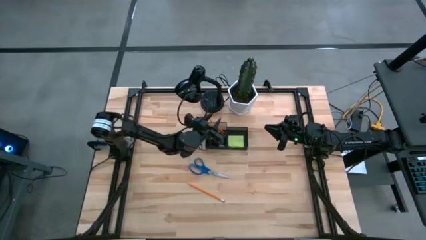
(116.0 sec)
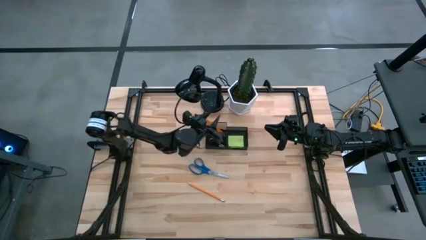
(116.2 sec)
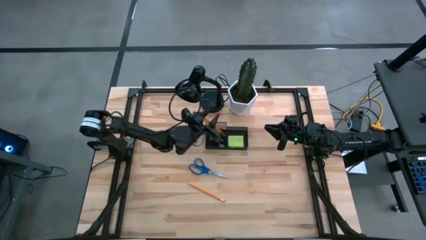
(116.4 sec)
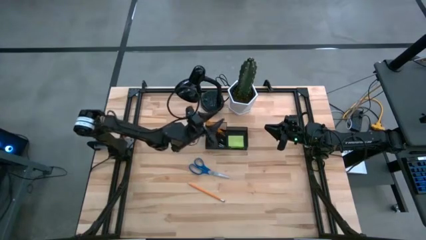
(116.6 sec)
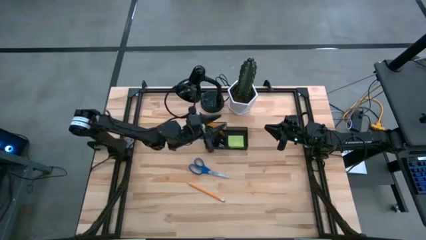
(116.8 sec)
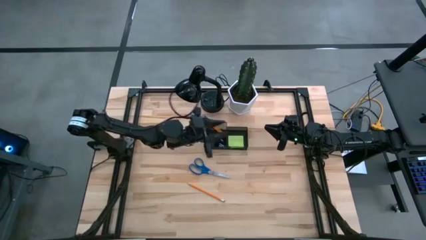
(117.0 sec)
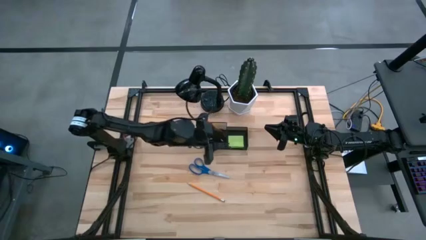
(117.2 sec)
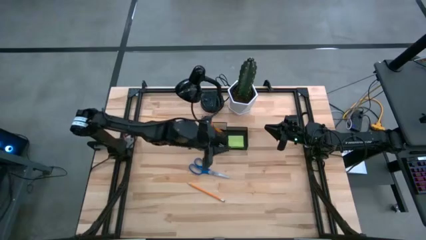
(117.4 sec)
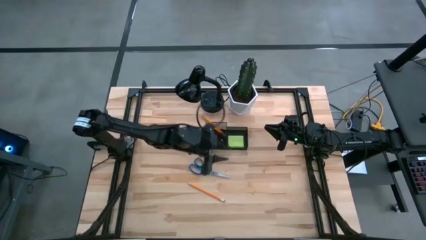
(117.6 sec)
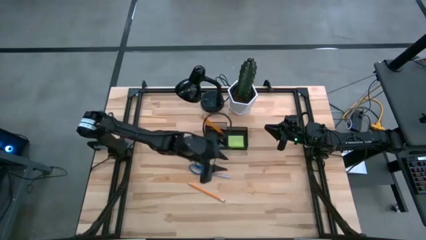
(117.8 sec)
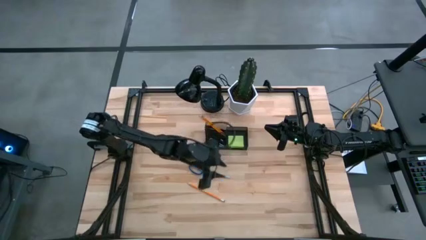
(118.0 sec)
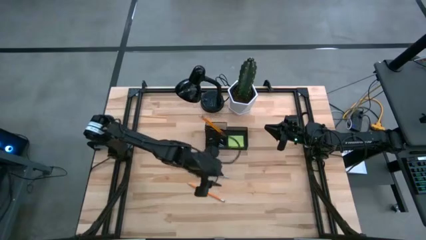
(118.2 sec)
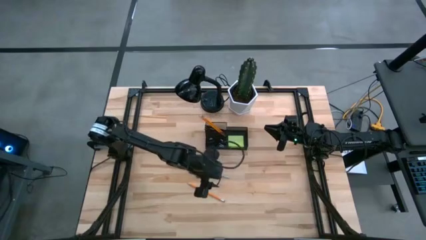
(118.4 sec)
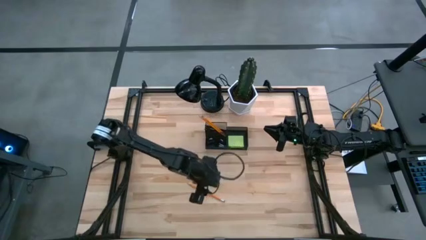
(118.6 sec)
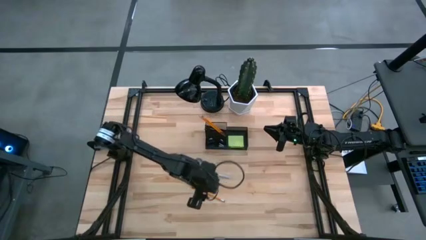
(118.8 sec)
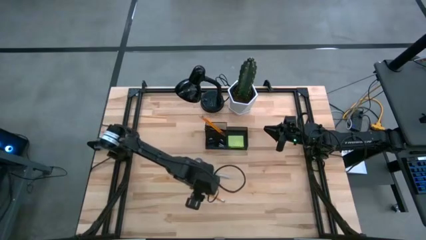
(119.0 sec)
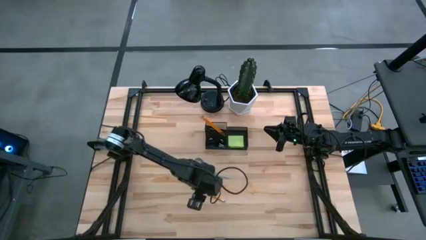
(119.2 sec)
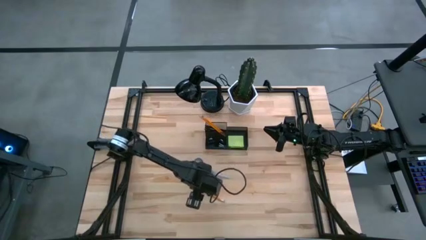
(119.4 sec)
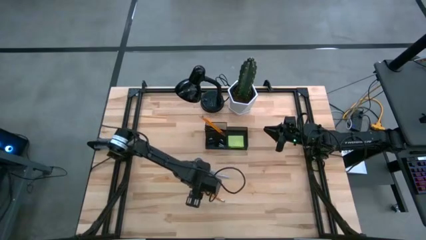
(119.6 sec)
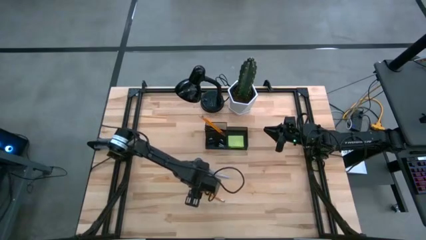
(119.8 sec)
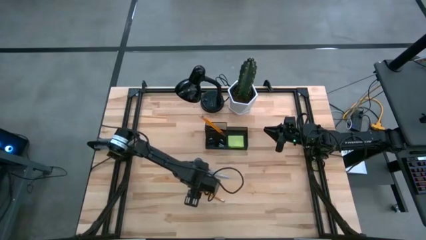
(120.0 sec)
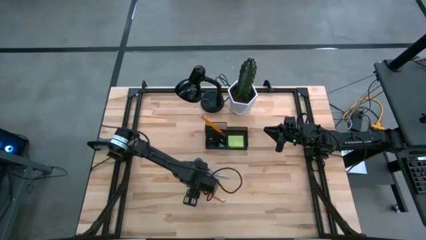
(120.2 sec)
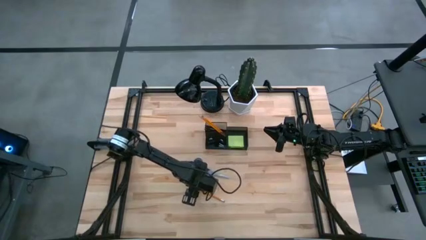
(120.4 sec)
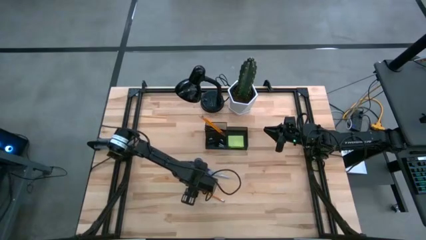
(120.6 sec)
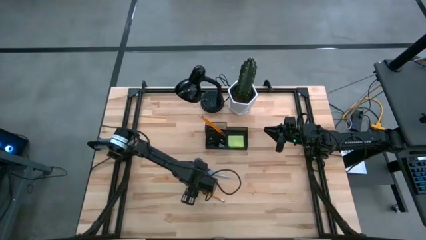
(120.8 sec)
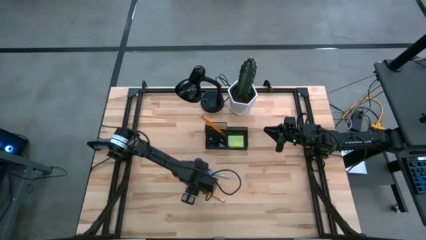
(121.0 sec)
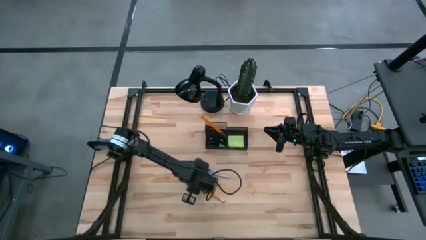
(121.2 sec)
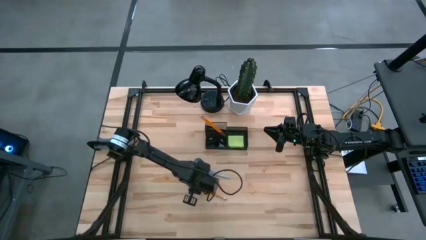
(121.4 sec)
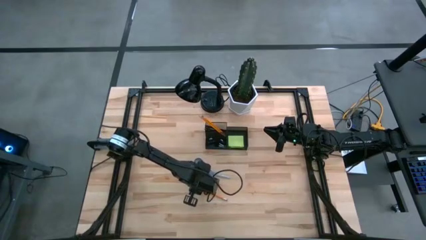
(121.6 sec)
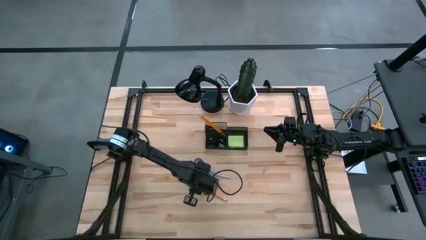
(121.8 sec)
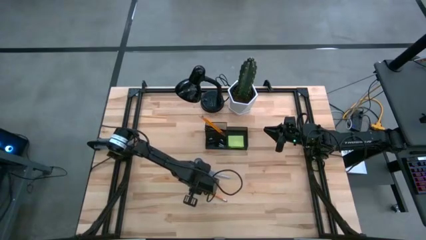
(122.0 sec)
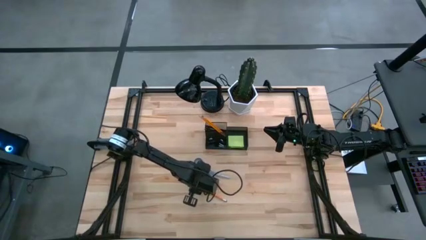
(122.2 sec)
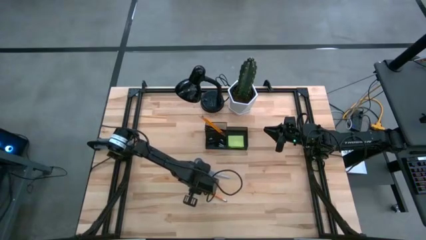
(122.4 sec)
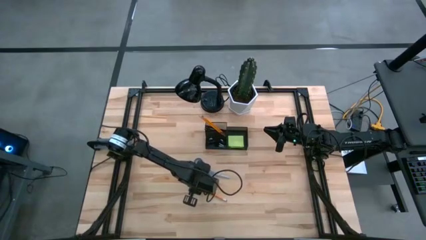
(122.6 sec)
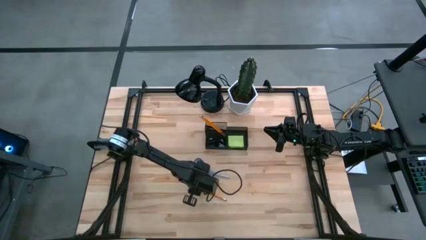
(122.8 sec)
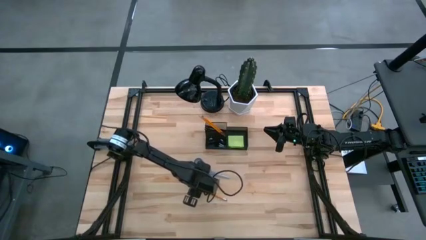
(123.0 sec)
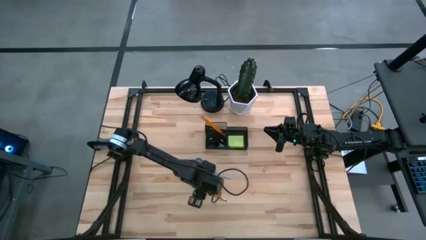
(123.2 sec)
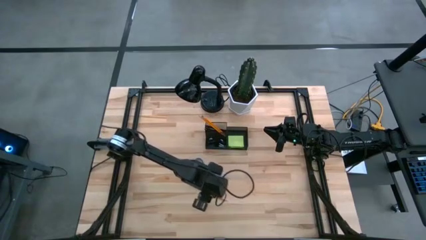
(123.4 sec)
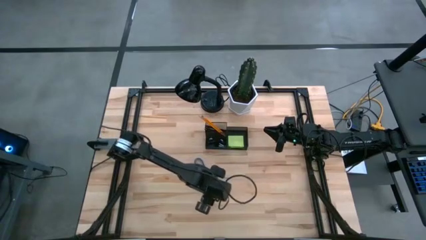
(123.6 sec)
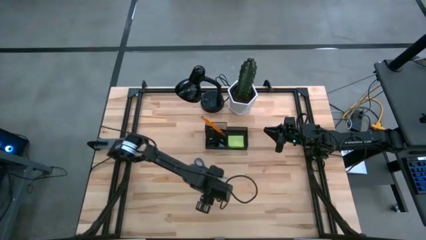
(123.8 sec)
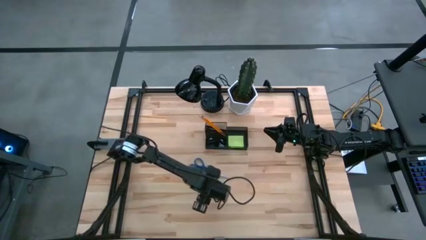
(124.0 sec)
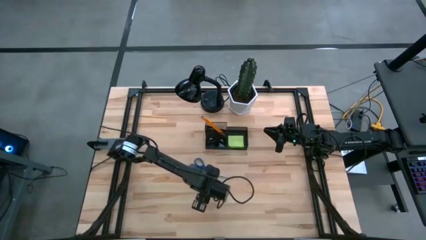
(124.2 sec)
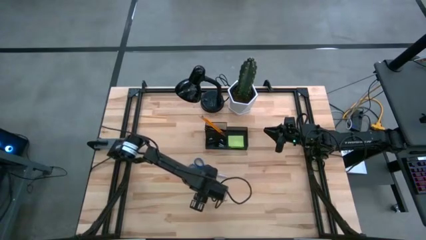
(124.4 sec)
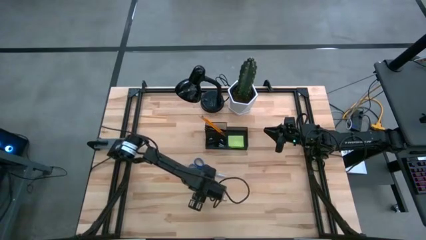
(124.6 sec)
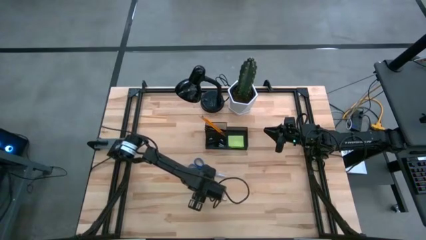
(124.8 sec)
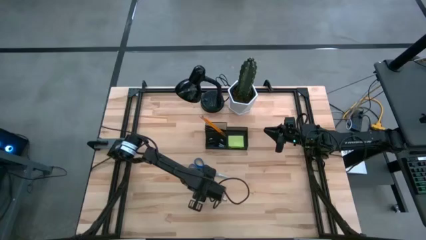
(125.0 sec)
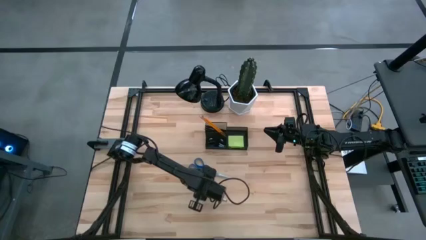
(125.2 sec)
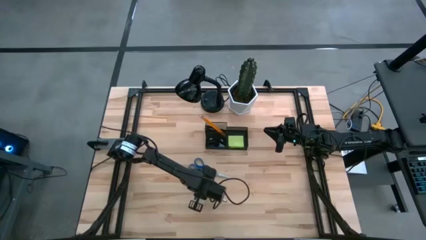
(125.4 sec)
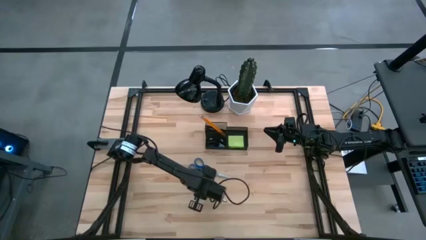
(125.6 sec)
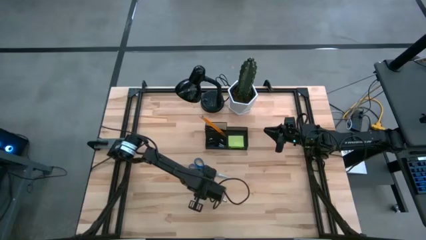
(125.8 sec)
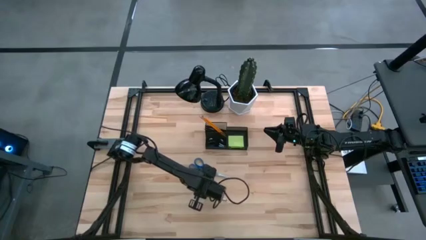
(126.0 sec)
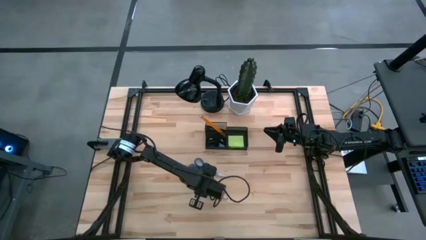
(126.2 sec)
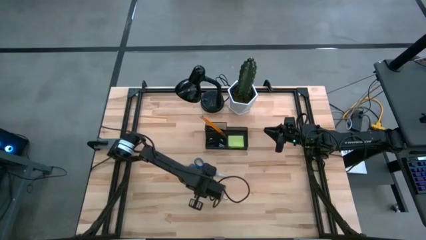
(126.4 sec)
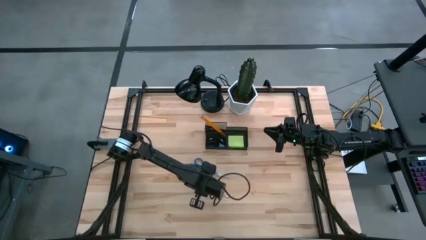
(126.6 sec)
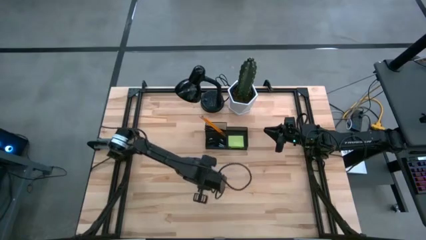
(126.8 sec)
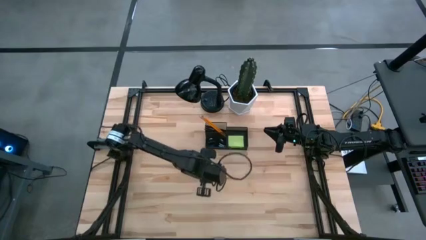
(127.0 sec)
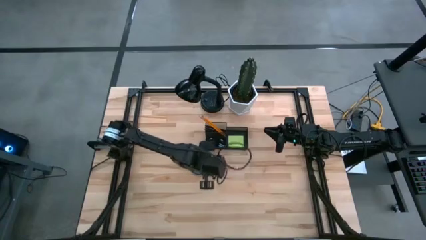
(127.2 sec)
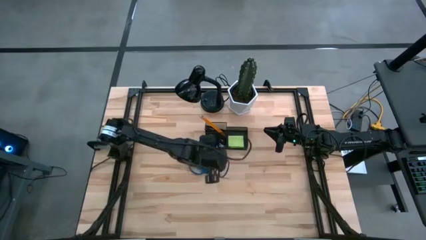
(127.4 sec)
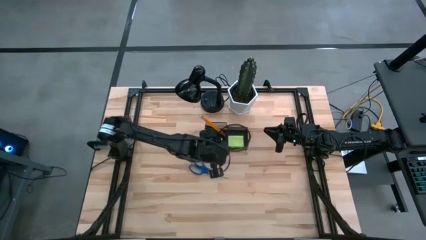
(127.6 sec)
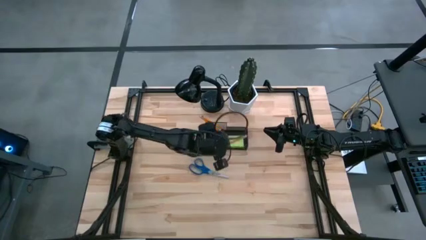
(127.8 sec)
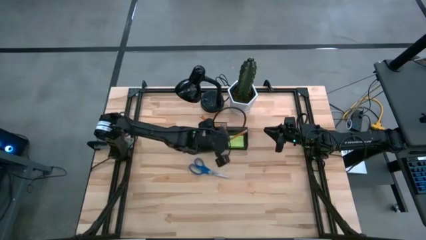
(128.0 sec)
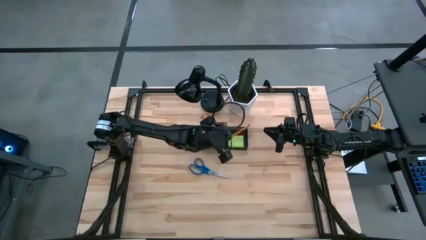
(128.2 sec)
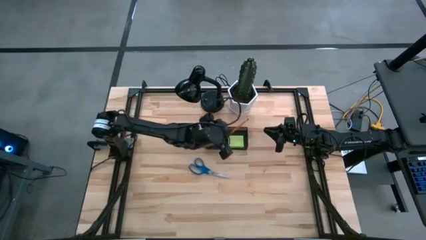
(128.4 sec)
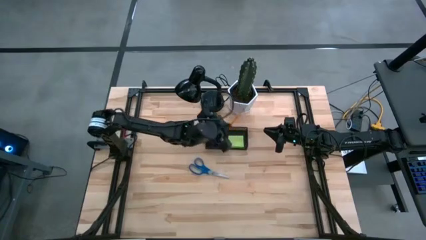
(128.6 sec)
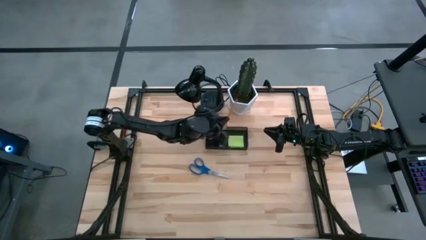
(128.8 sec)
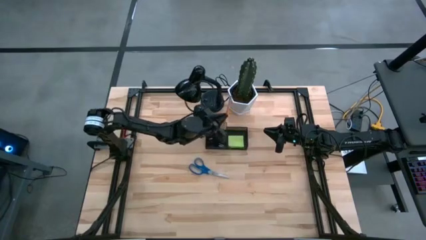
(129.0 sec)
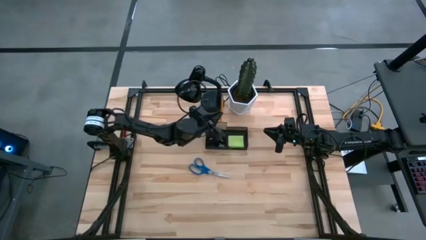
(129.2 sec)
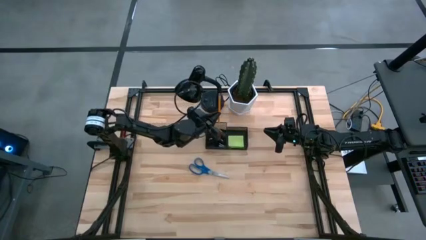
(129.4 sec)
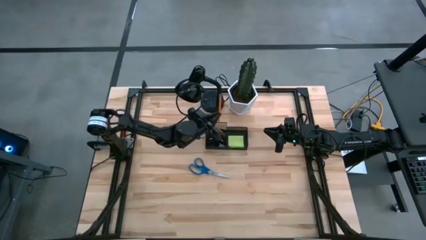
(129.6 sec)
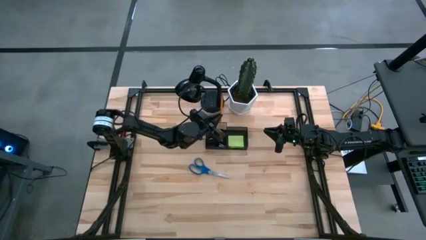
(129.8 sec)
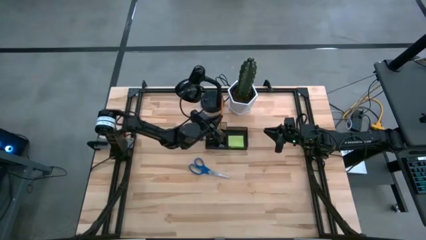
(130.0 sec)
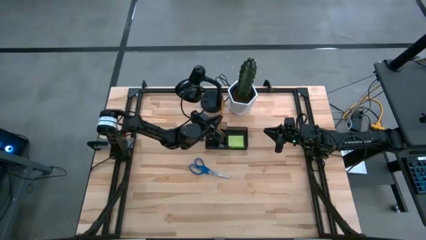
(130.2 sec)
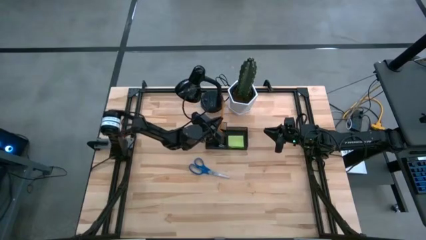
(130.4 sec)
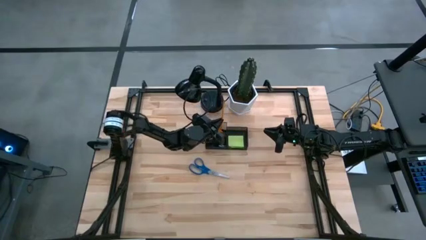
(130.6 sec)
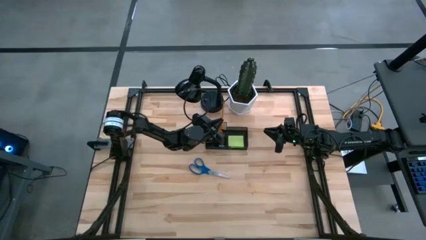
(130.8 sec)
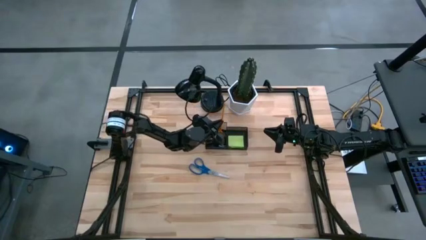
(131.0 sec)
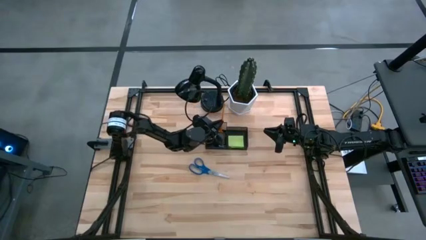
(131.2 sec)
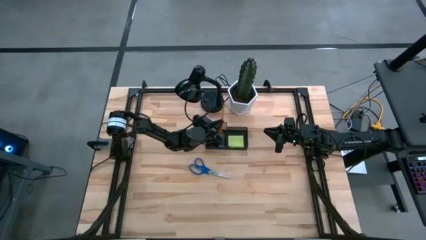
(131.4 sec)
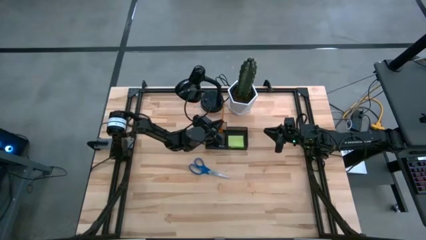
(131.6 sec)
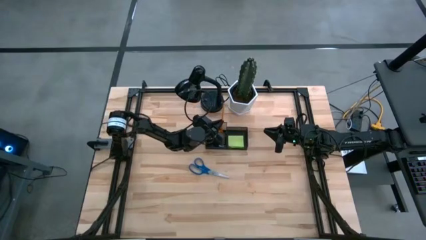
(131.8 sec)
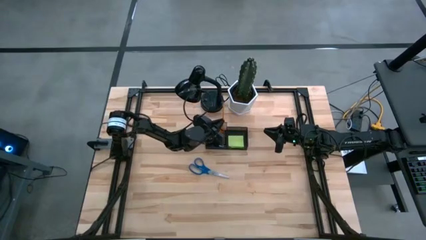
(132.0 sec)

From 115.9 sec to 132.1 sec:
Task: Pick and place office supplies into organizer
Put the yellow pencil into the mesh desk organizer
